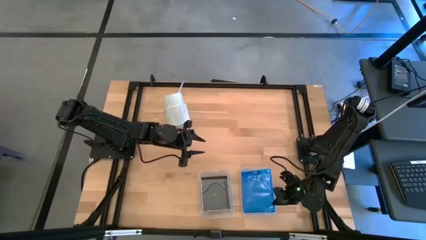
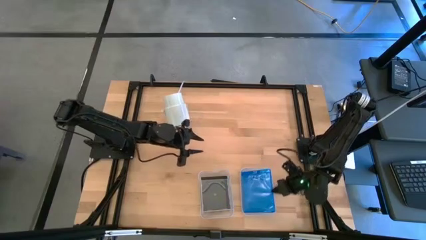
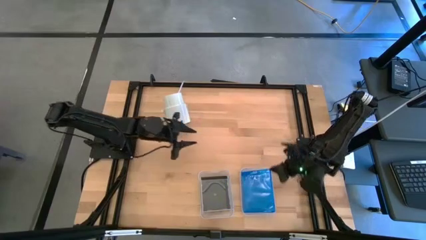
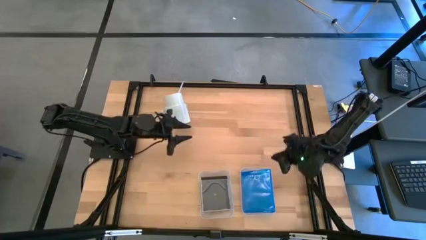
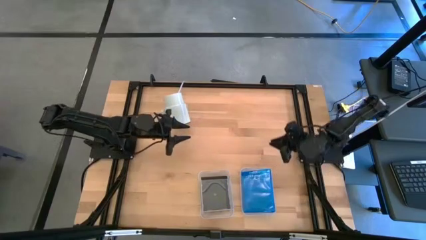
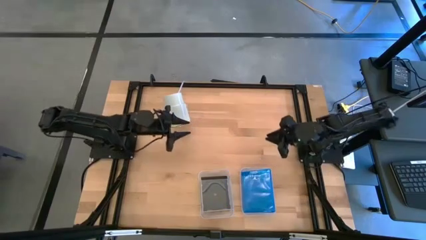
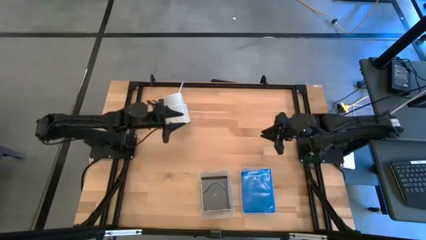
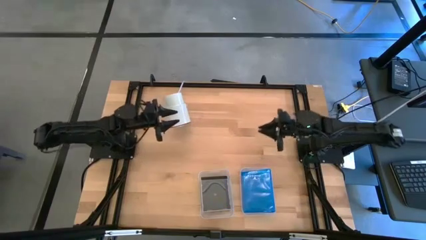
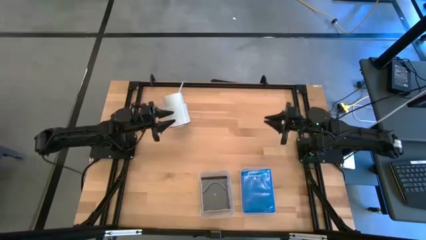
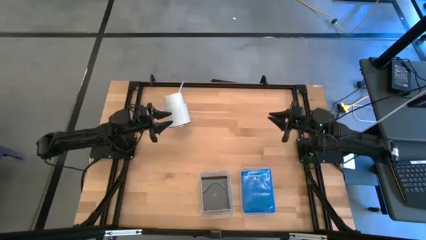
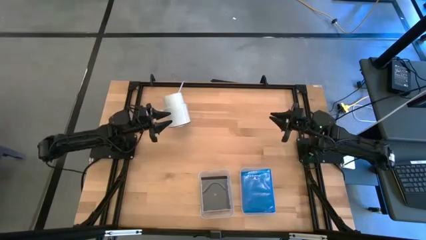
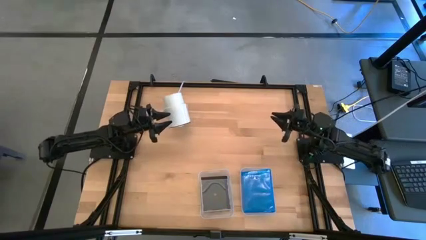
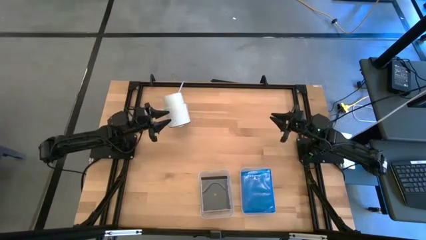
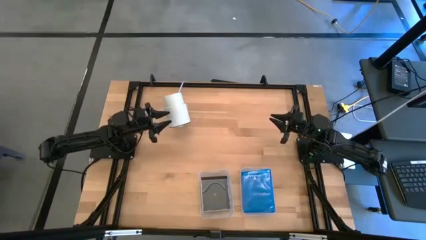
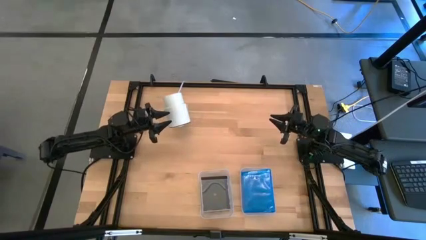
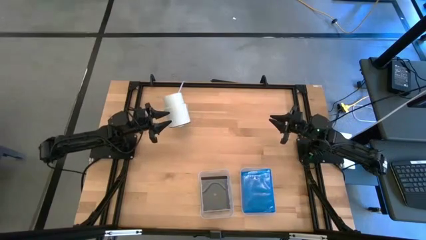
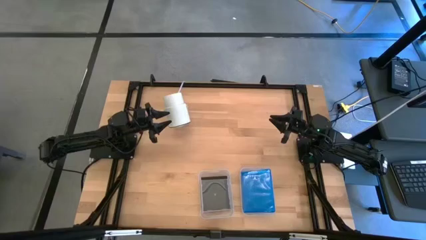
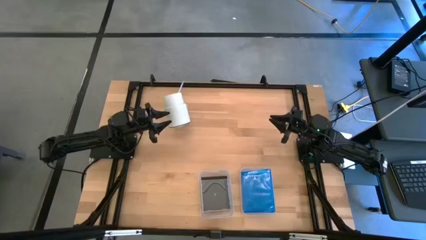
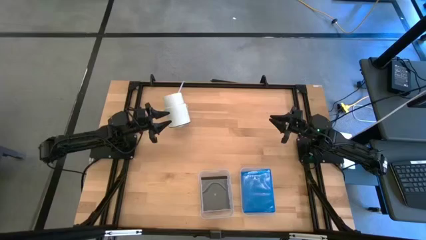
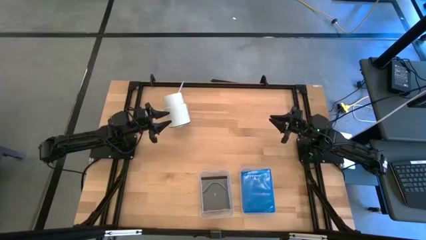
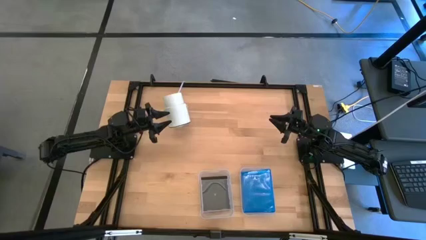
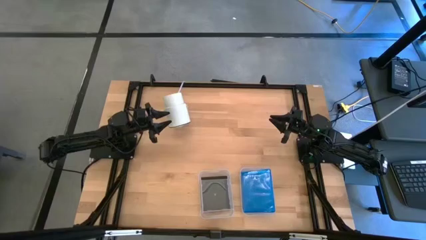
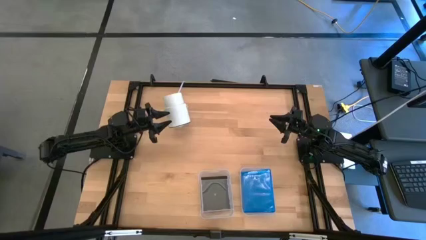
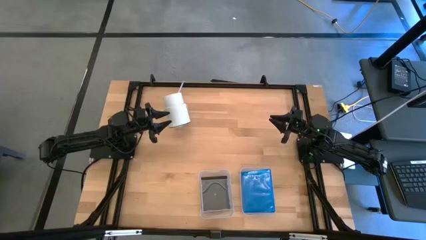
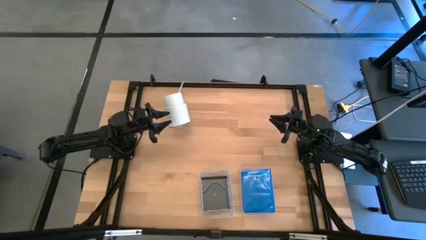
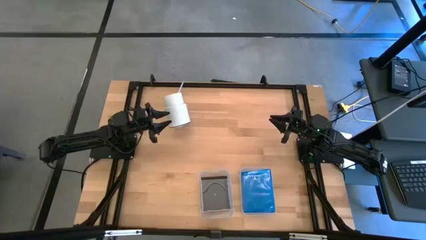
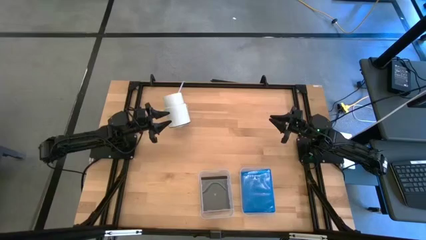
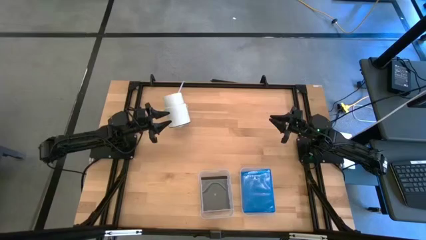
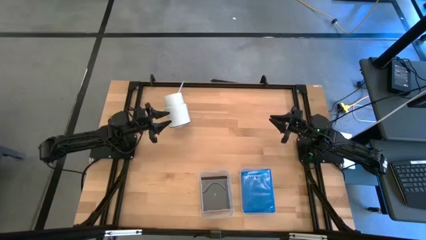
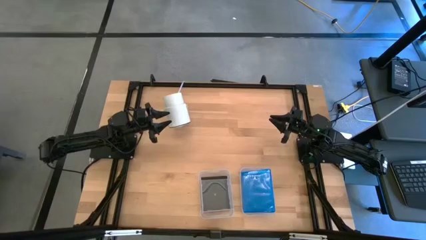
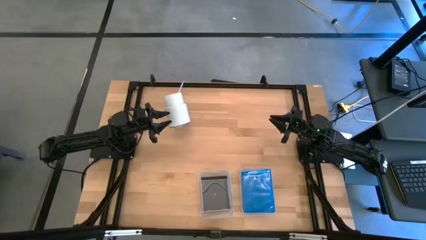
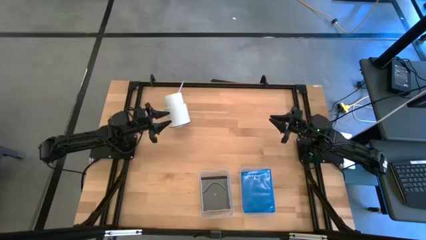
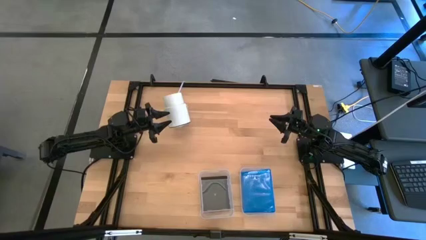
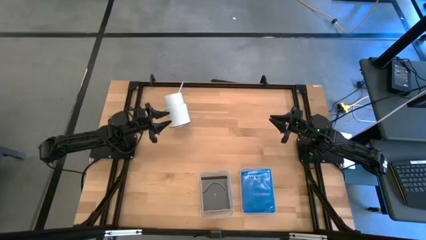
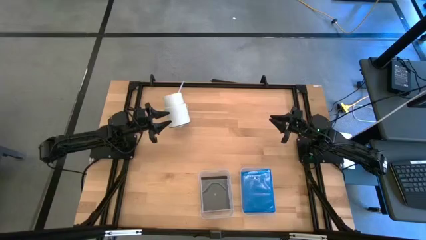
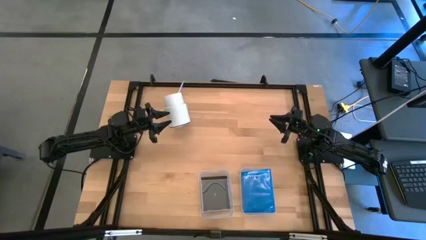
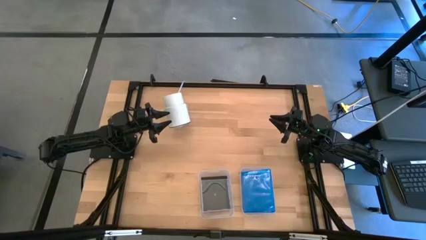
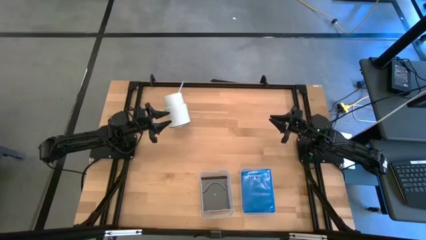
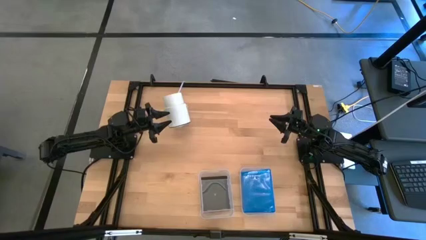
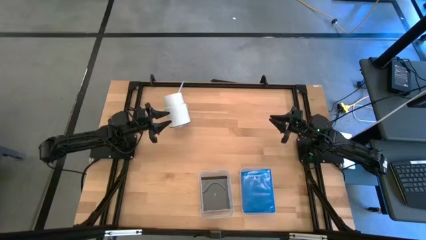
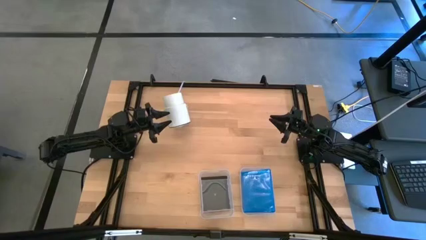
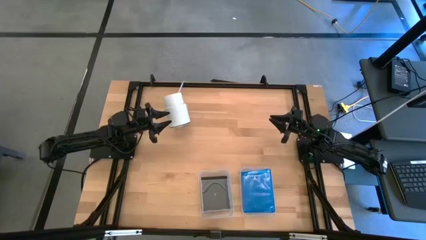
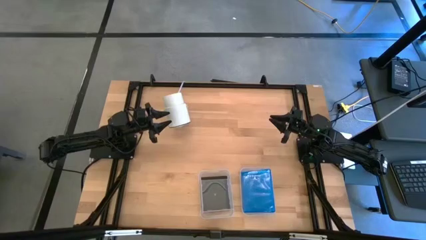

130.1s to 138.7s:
Task: Pick & place jewel cases by type
Return to Home Position

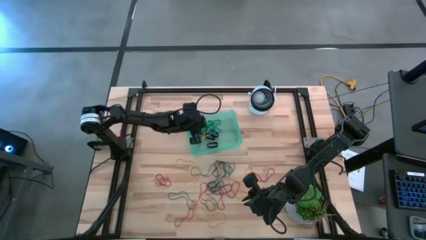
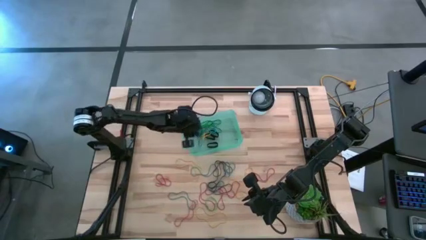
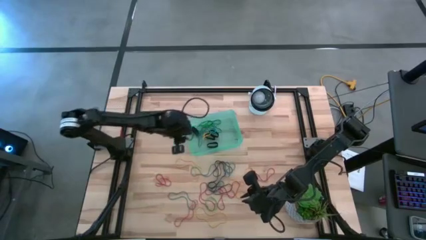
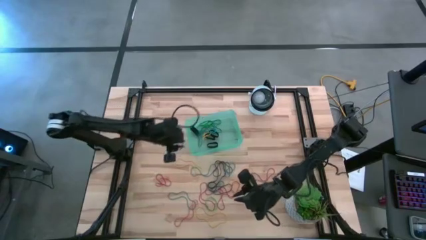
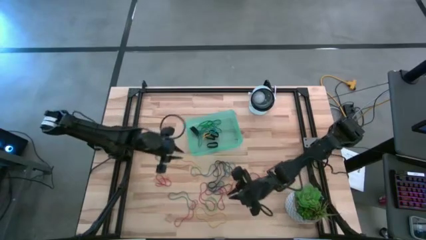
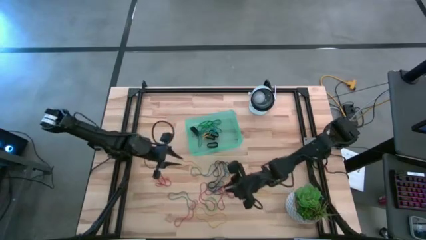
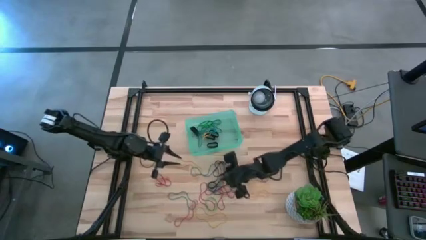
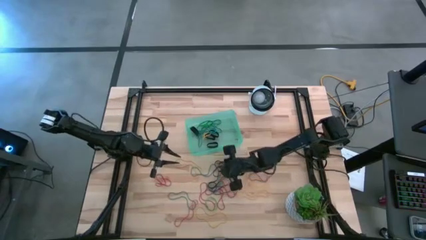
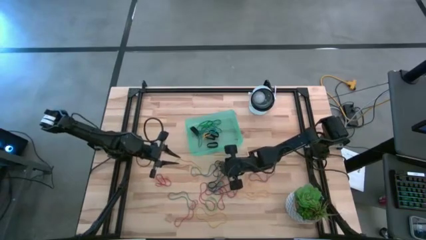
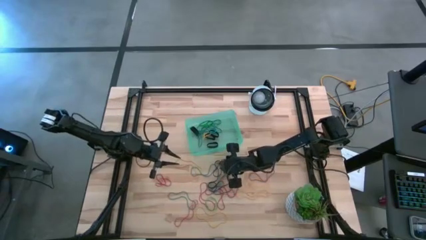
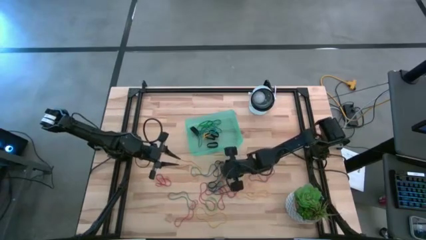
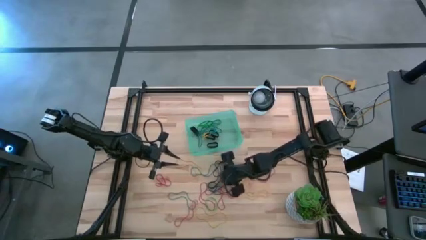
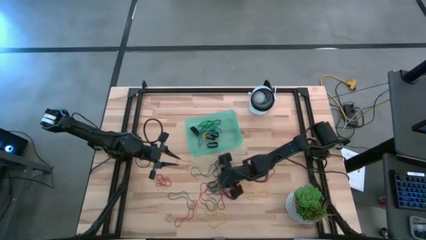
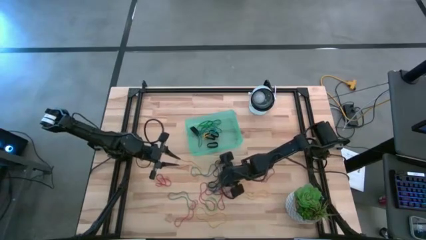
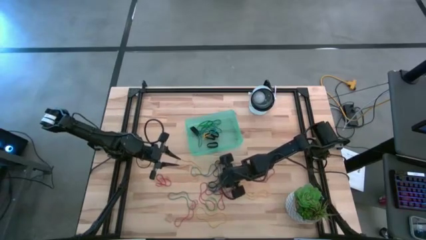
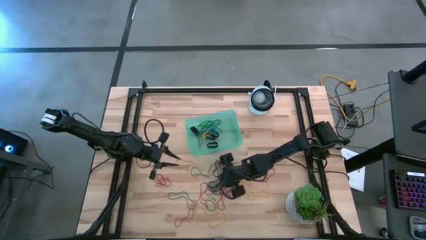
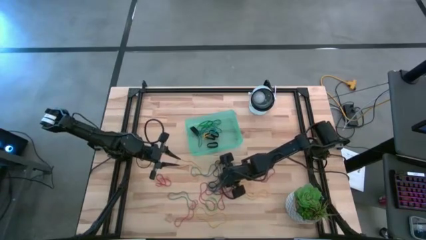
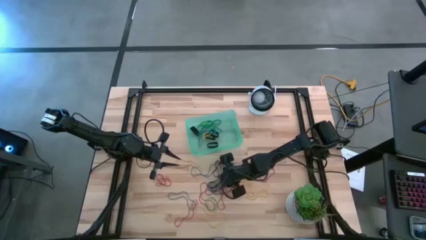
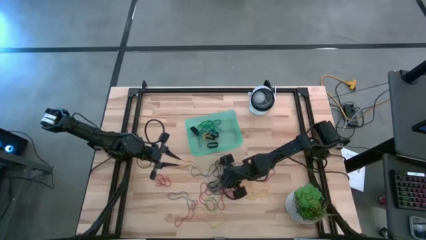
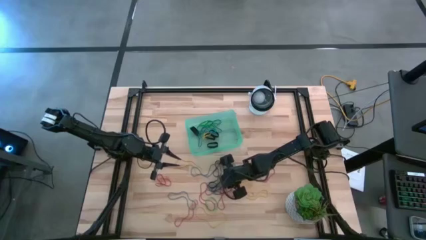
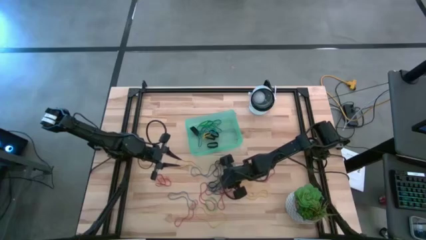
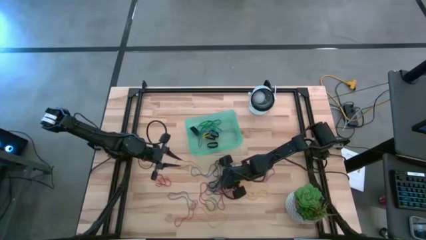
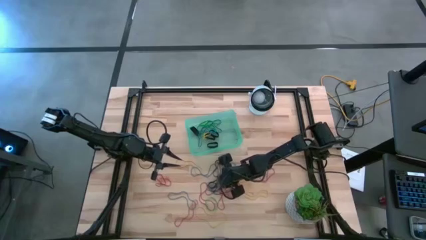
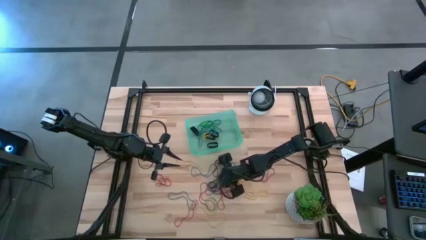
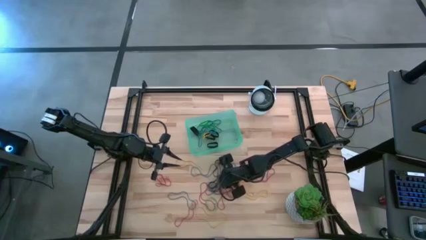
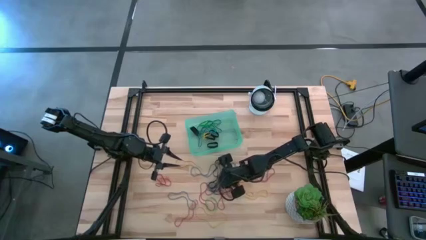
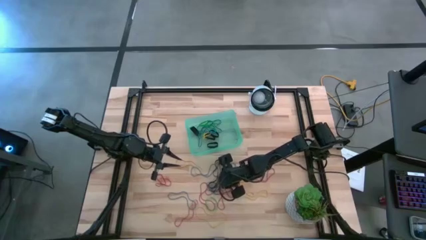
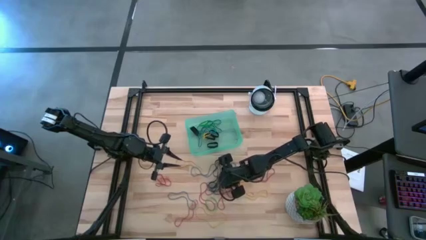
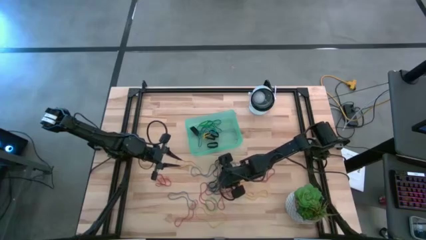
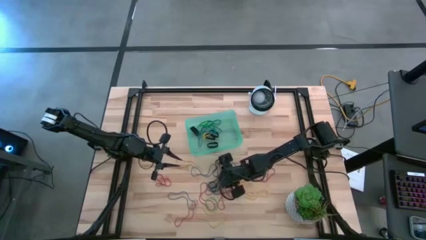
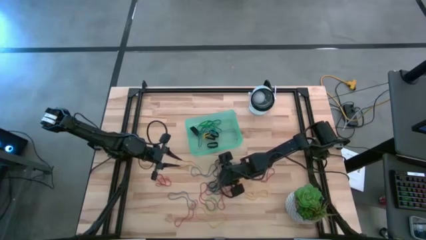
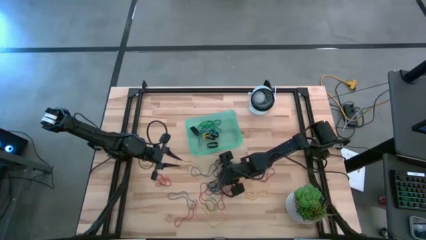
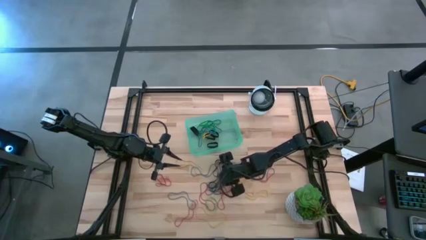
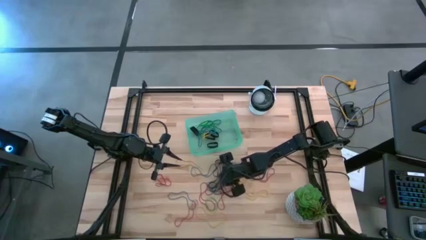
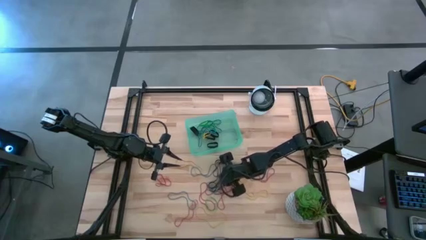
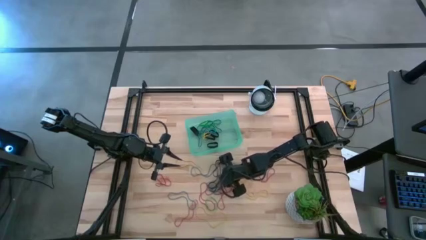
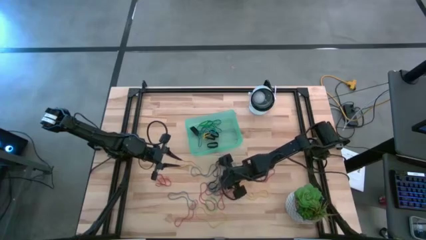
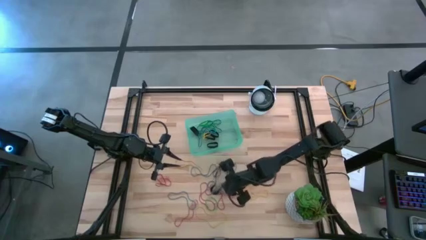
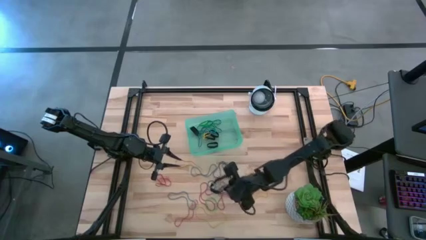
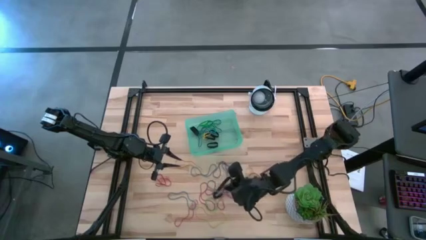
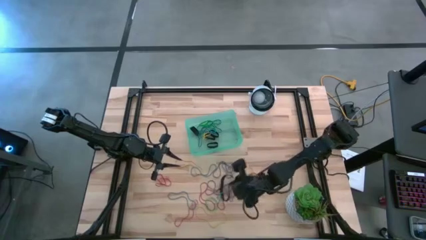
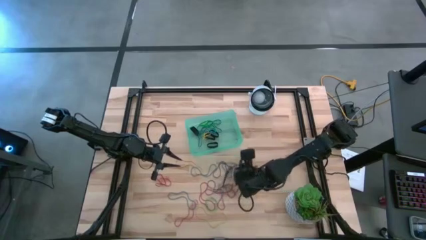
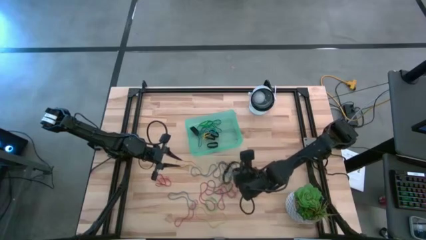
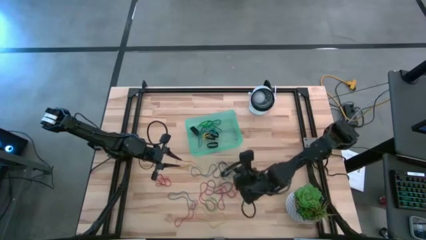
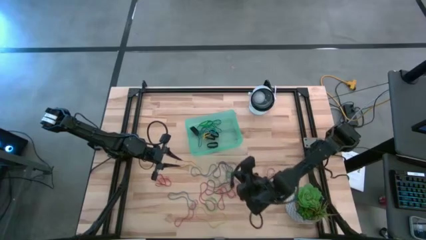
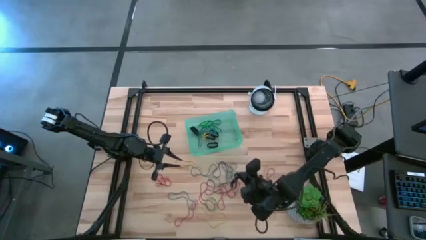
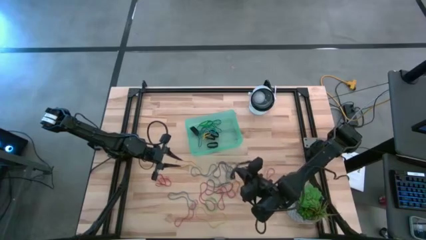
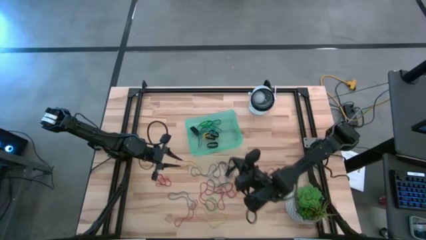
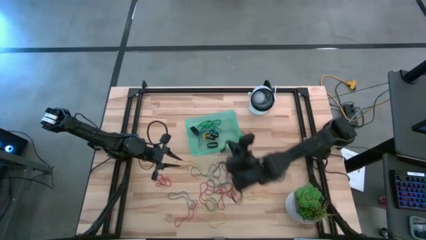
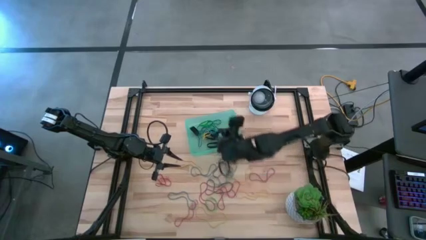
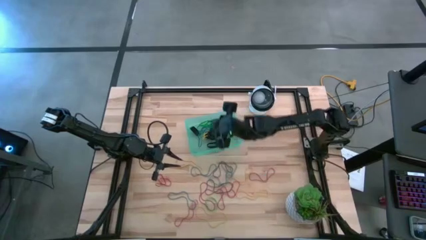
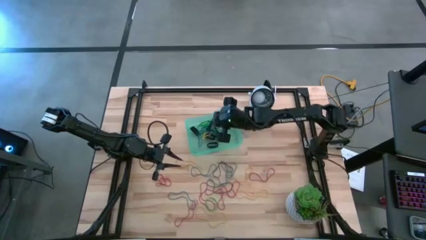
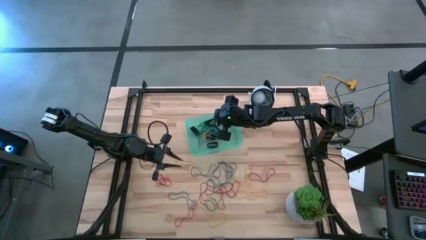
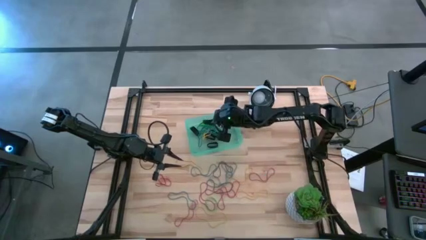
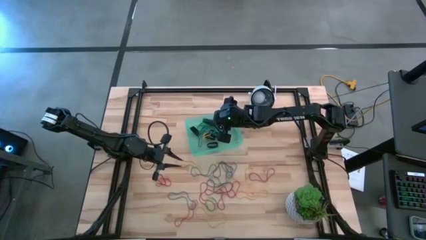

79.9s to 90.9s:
Task: Pick and place rubber bands into bin
Put the black rubber band into the green bin
